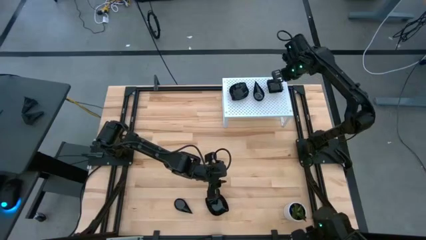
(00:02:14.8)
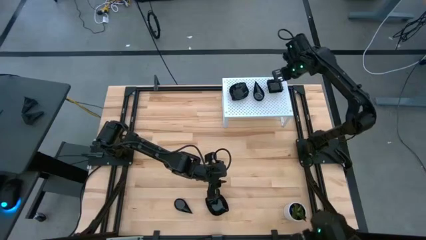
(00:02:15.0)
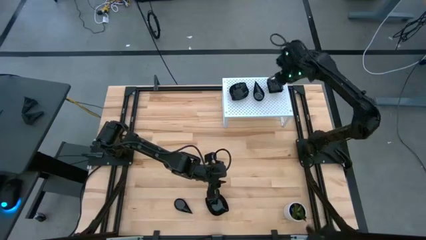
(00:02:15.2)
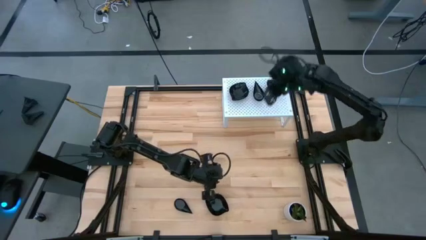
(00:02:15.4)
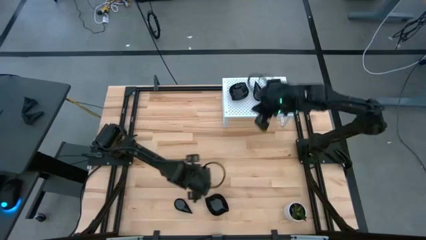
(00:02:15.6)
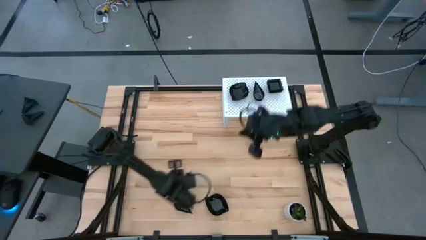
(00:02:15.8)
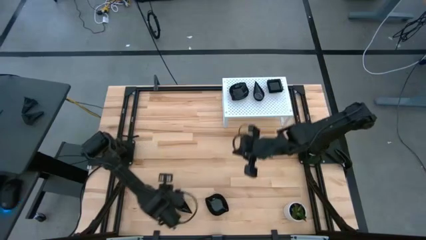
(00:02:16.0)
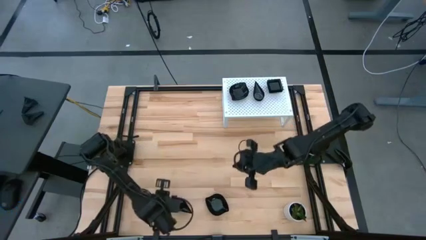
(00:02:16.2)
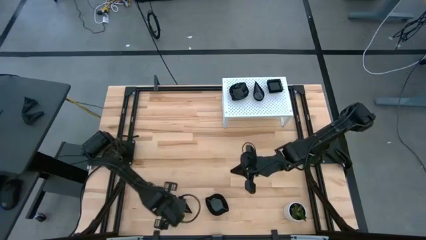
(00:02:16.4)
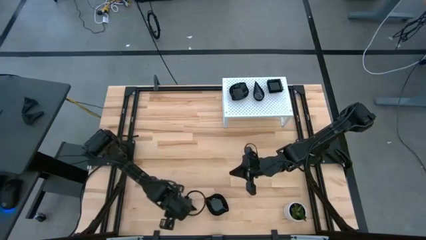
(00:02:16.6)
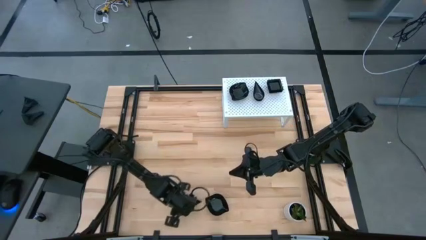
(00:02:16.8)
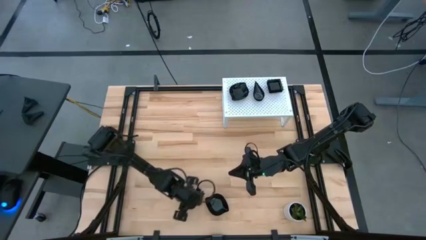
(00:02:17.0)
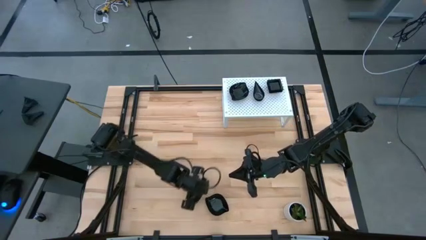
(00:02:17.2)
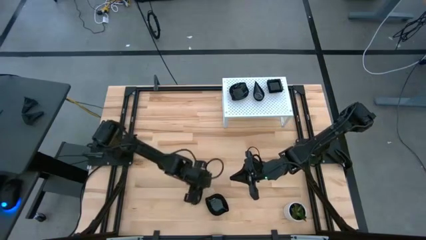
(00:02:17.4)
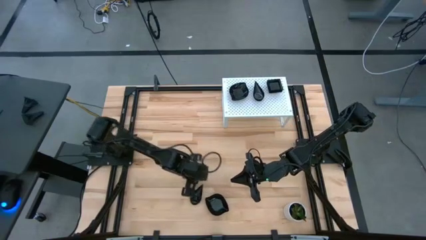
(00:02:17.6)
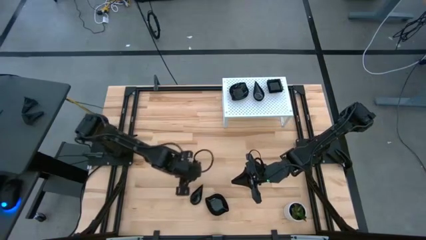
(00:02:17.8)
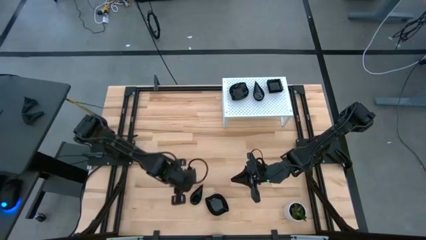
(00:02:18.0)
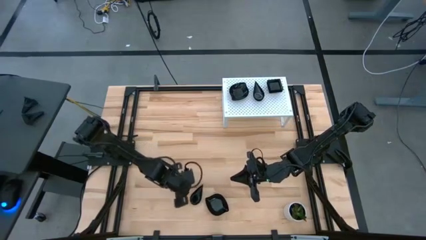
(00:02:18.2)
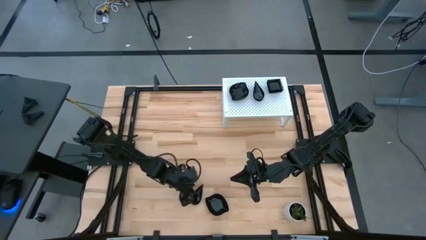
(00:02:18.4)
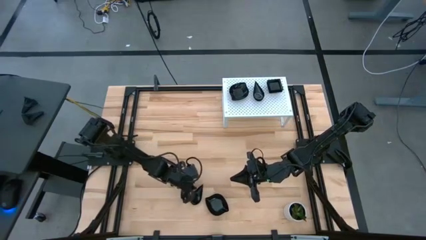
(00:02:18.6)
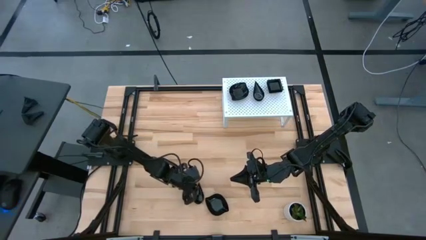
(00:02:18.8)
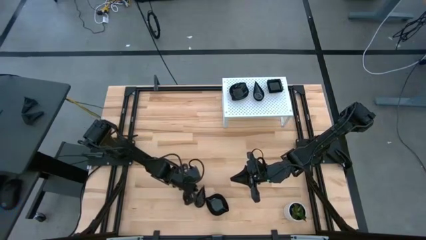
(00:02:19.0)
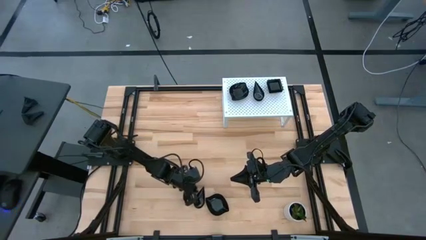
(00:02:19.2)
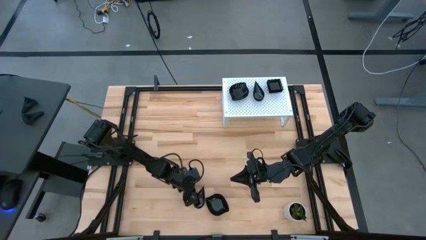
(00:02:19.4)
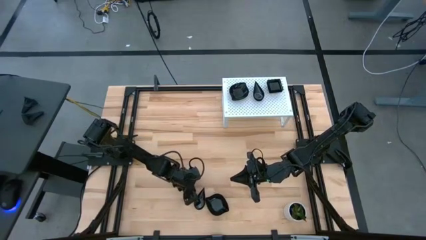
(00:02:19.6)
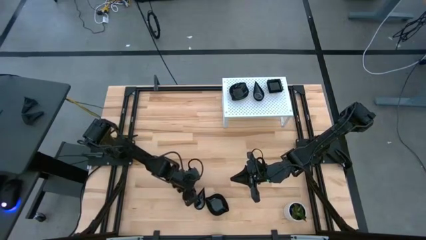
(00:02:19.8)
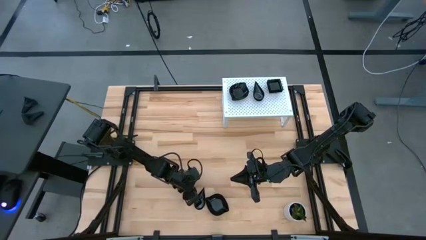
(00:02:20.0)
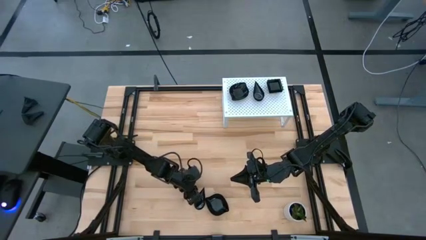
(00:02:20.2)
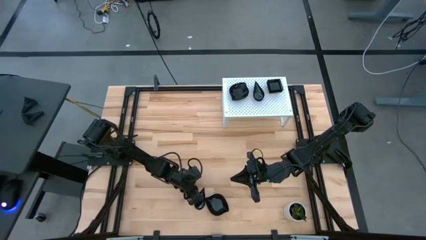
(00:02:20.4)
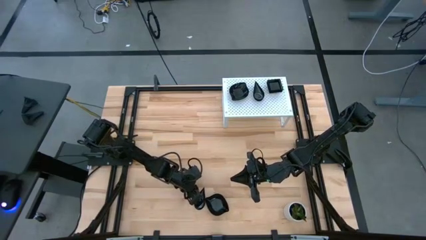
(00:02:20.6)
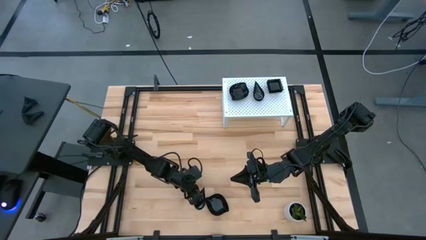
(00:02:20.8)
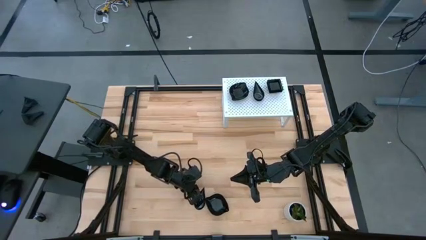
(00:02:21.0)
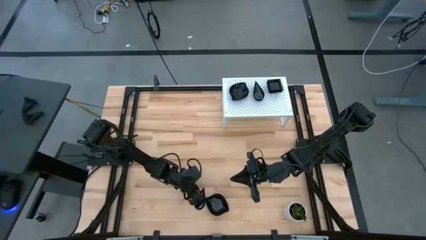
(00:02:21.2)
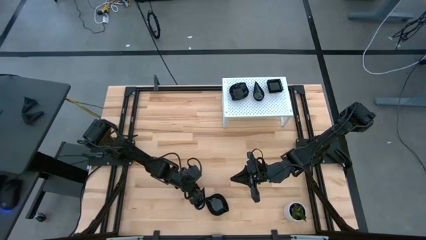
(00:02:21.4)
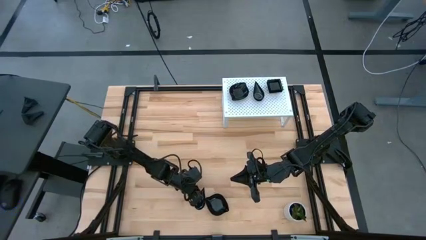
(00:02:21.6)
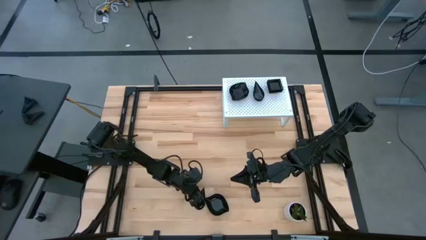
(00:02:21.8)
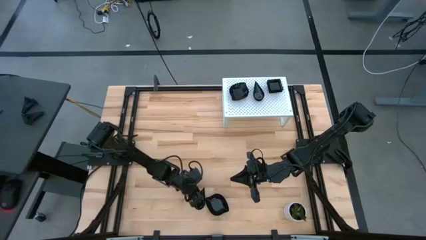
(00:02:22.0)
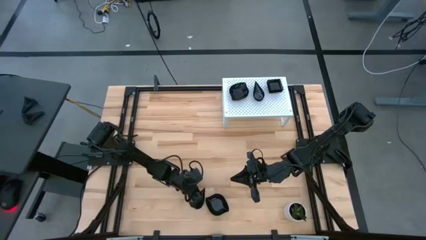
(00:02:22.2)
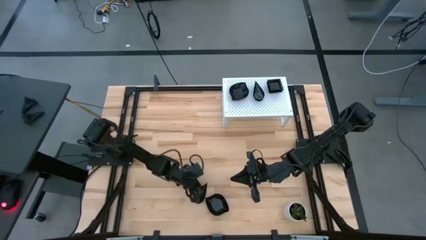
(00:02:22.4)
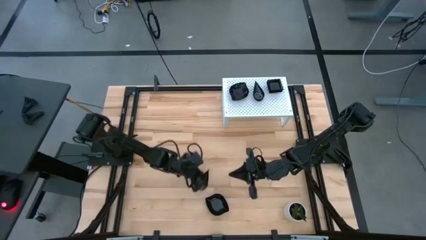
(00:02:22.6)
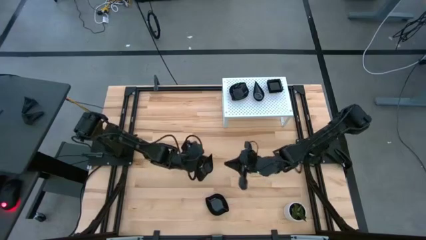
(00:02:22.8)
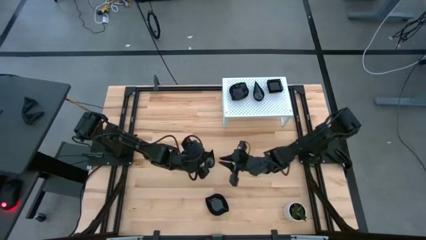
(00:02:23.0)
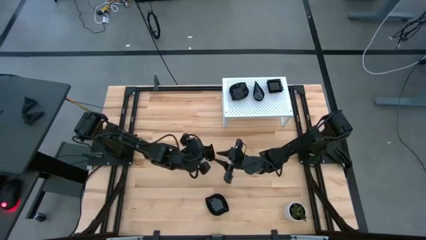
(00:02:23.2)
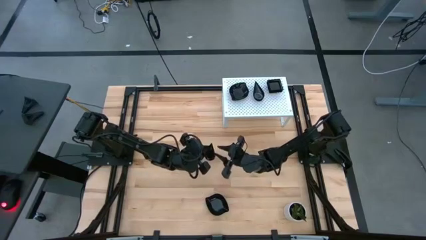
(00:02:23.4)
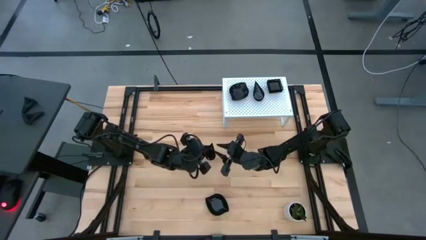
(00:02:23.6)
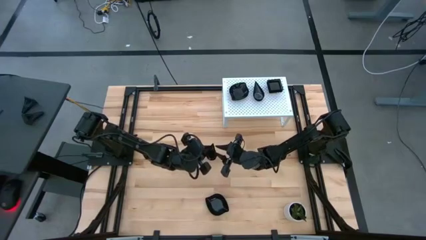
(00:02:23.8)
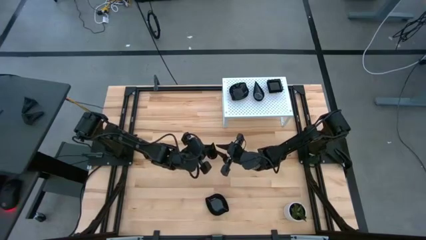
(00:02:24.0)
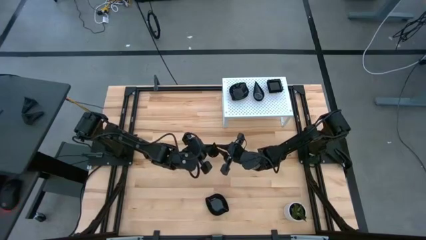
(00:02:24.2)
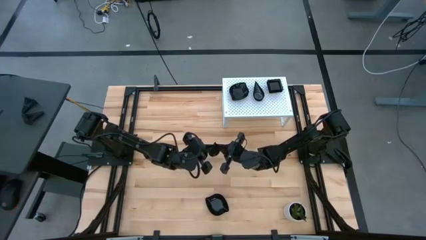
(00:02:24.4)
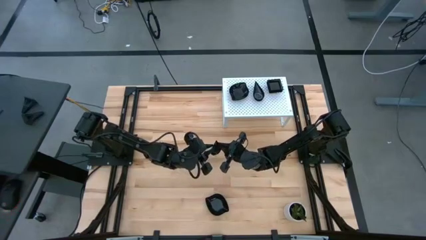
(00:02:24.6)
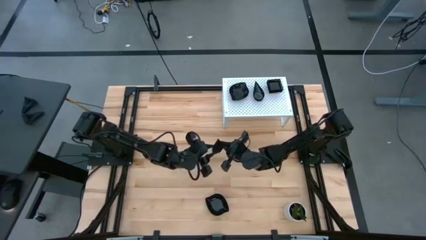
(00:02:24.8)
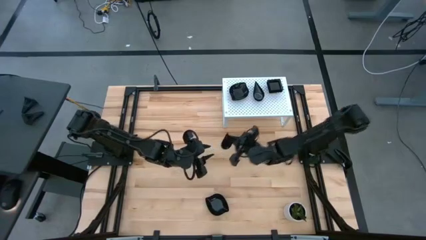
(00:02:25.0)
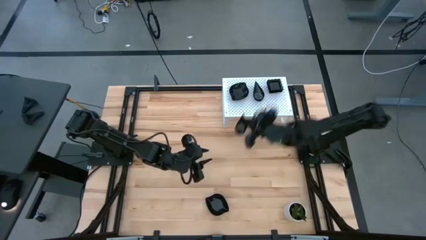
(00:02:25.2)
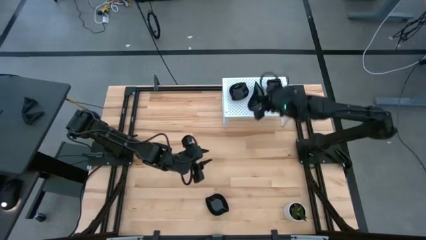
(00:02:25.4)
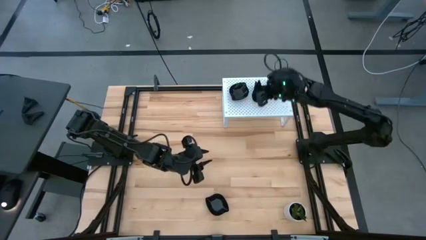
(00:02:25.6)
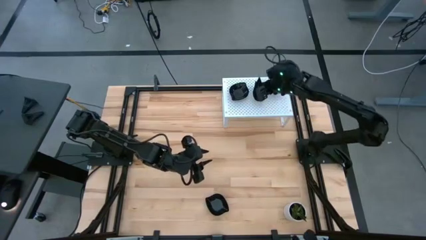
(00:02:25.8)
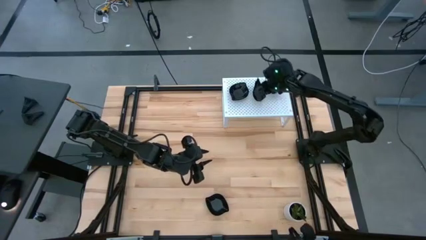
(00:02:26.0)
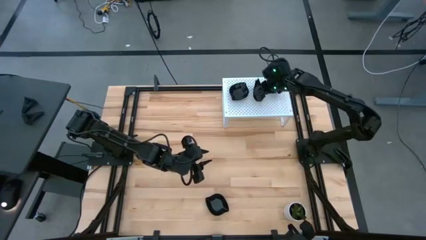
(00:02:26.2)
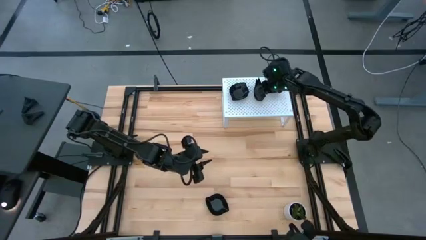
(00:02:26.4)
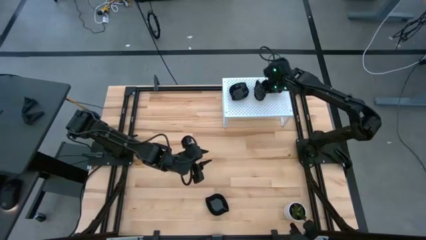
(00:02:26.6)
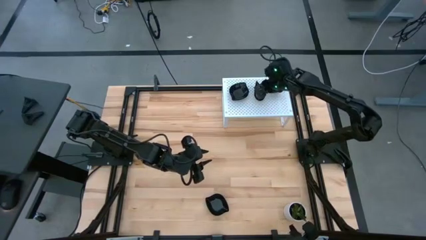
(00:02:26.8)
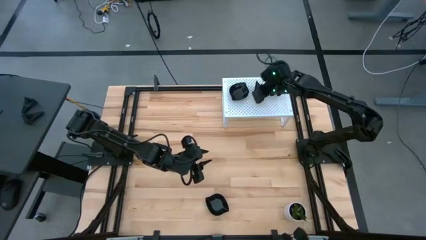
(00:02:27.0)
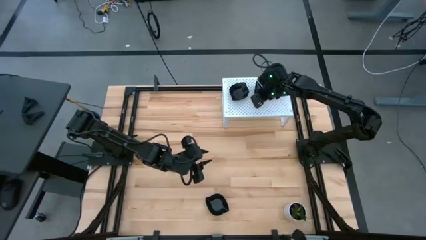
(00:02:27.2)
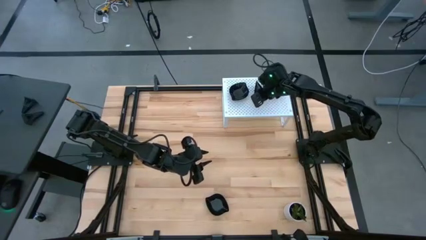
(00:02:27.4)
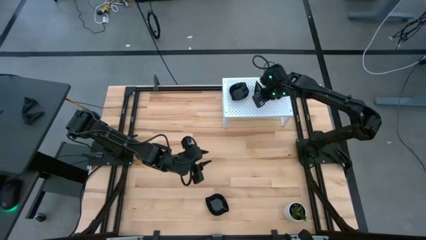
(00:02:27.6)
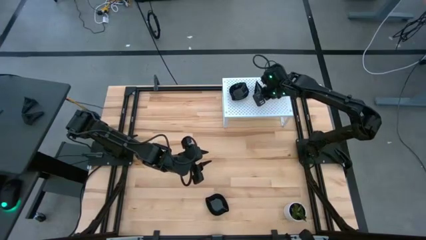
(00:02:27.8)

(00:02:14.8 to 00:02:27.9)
Task: Pick & Place Mini shaped plates
Stack the drop shaped plate on top of the drop shaped plates on the shelf

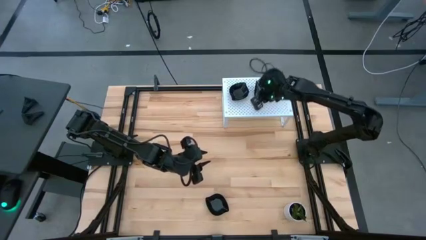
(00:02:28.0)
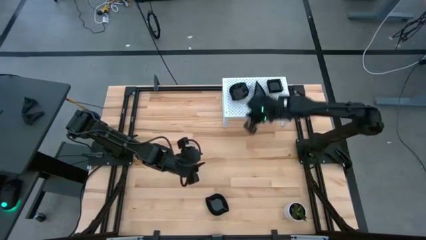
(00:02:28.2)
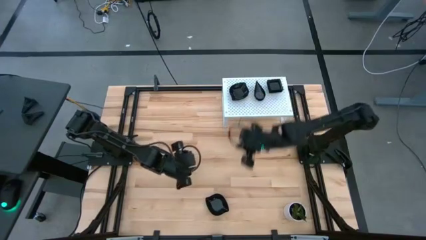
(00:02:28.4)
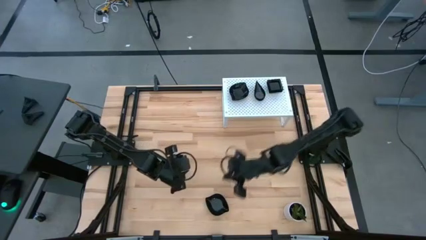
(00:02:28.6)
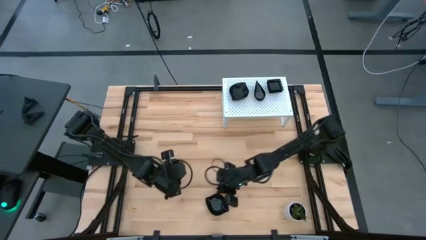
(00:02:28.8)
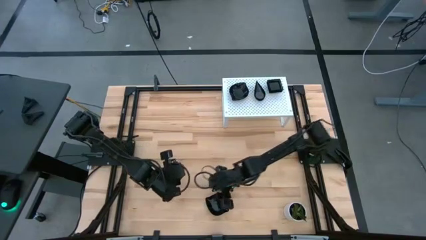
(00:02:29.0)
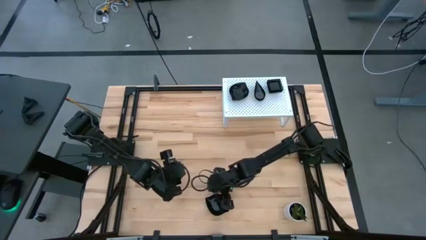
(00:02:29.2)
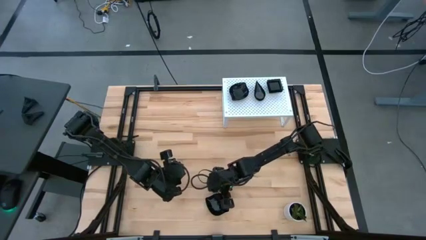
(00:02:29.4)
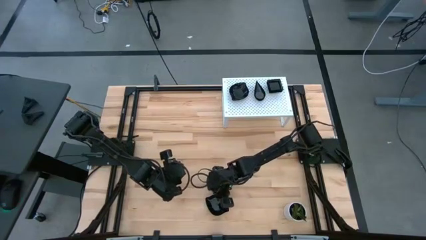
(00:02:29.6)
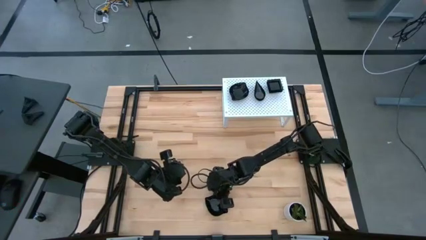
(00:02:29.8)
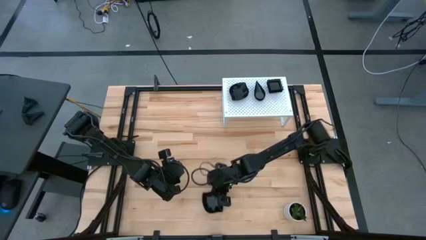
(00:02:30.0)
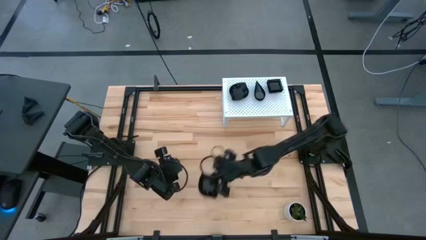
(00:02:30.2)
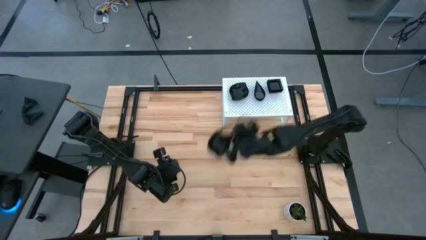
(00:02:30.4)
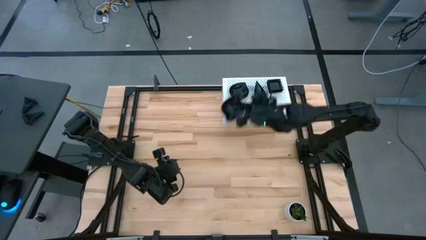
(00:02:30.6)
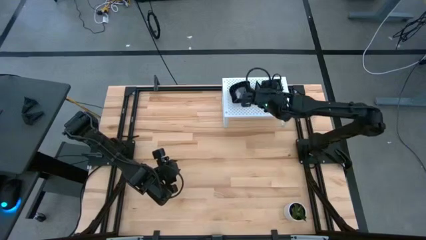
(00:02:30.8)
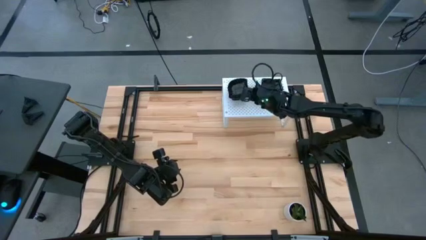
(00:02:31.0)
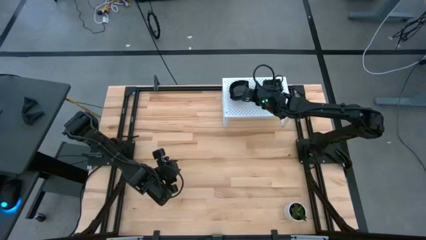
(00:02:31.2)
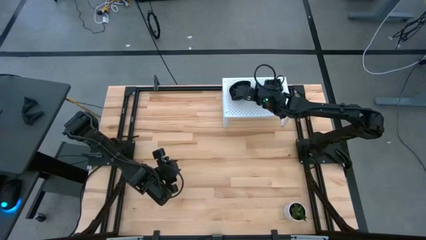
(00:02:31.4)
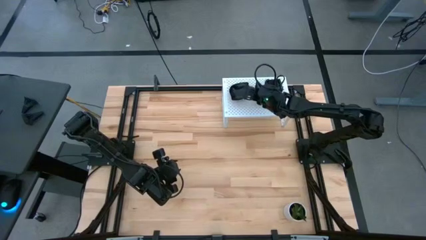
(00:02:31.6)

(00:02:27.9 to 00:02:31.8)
Stack the leaf shaped plate on top of the leaf shaped plates on the shelf
